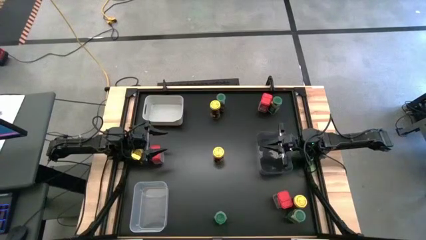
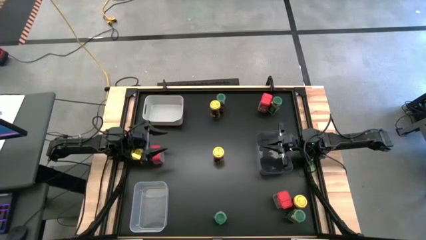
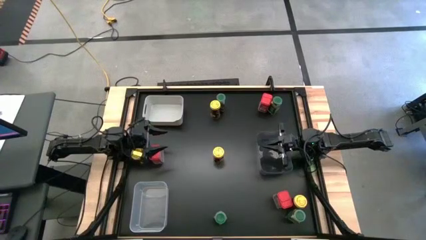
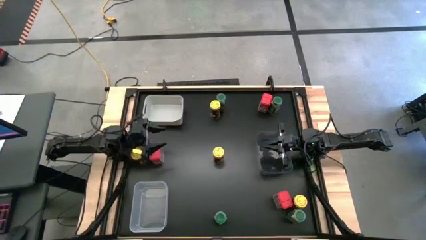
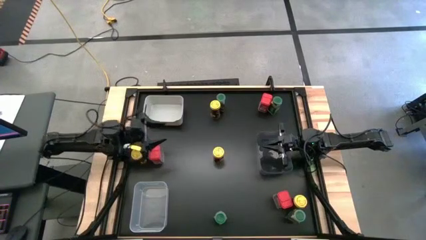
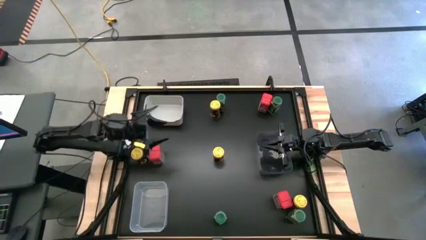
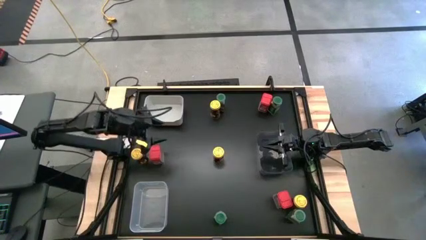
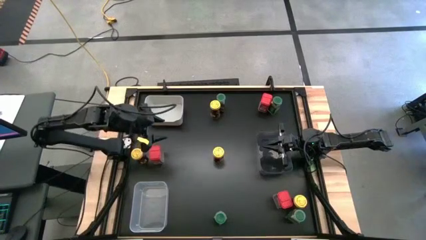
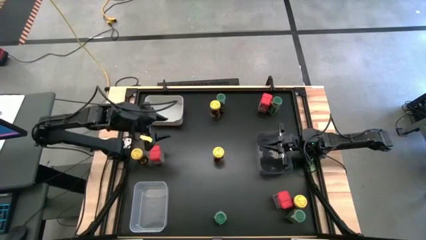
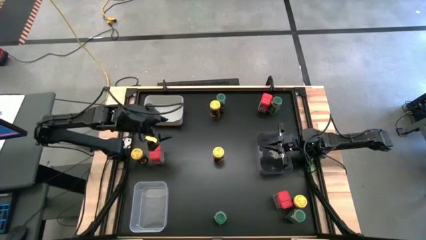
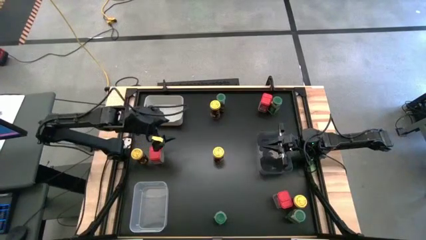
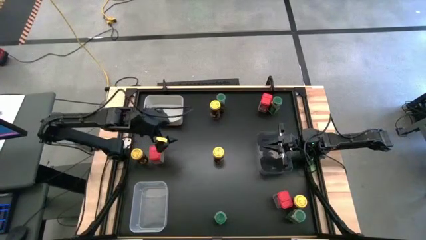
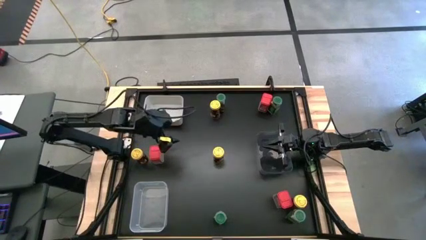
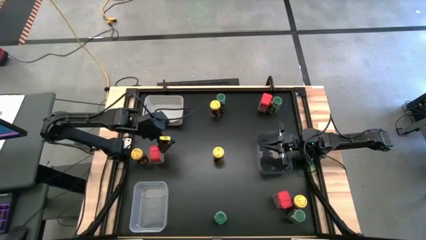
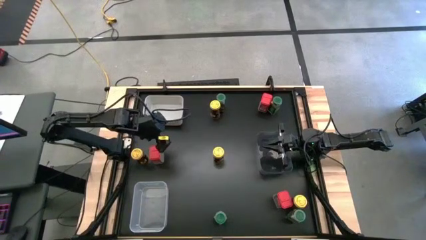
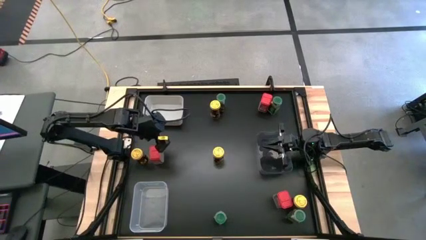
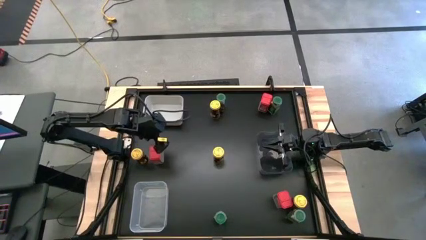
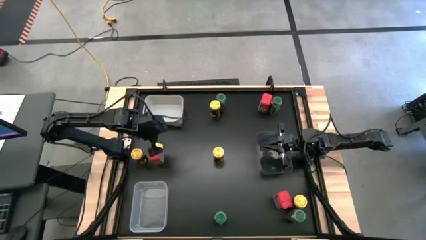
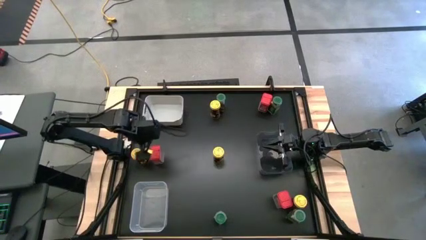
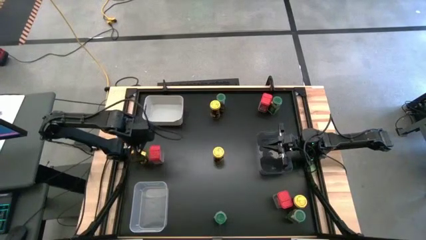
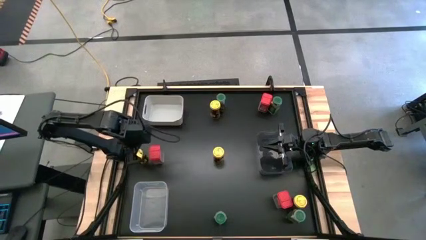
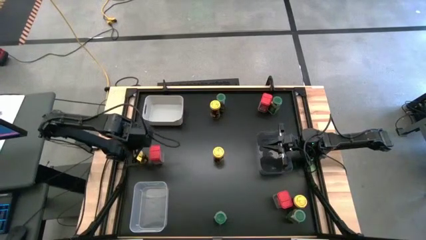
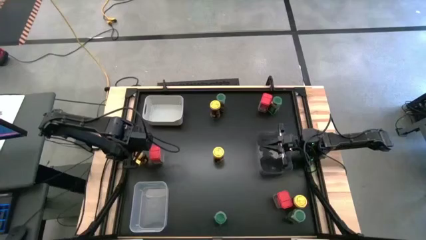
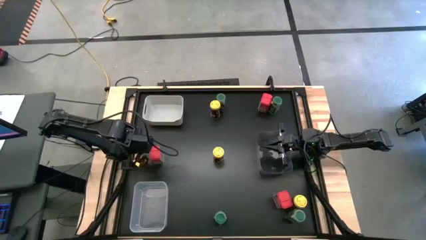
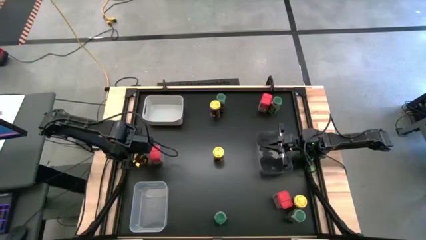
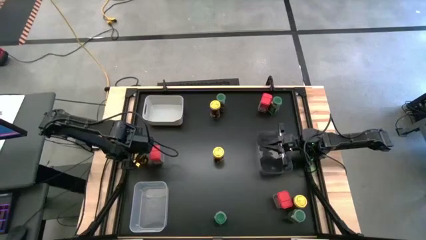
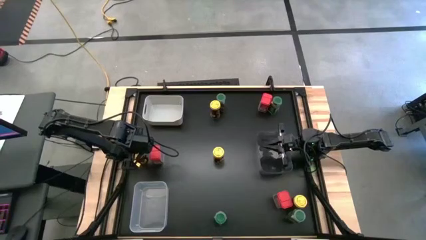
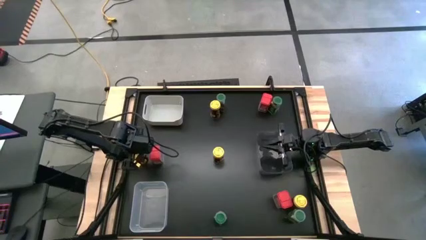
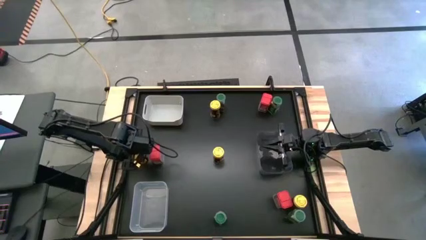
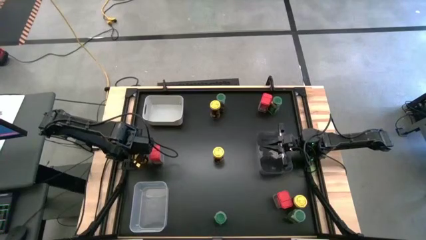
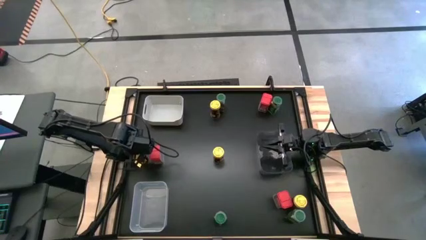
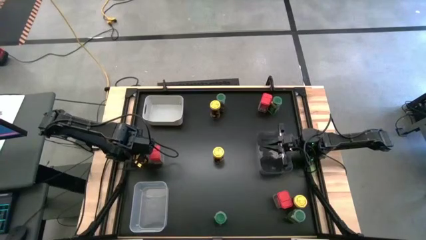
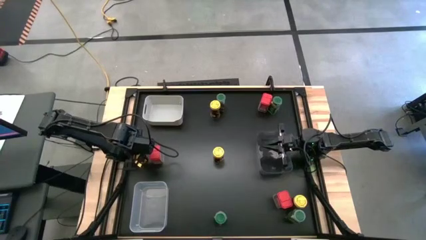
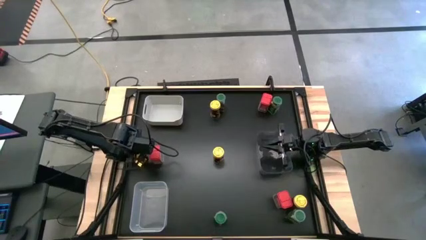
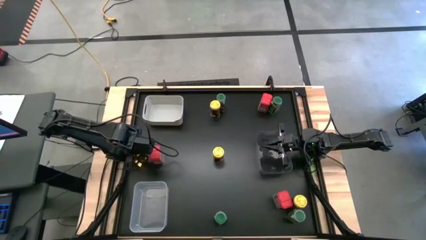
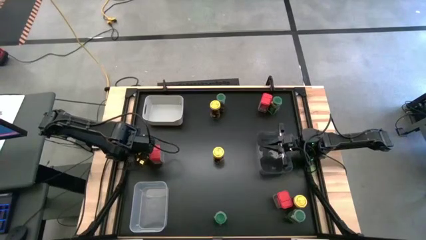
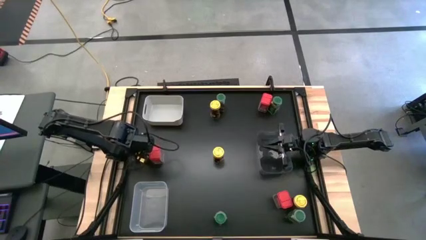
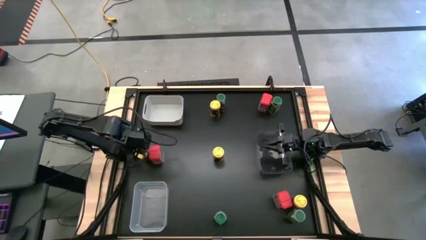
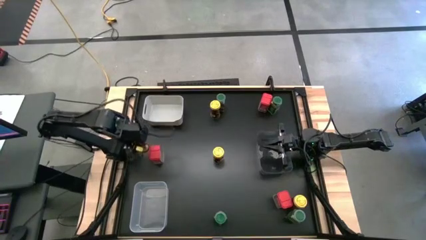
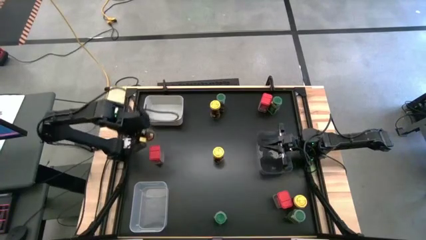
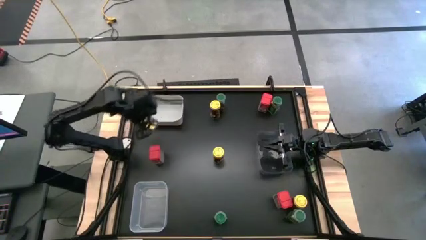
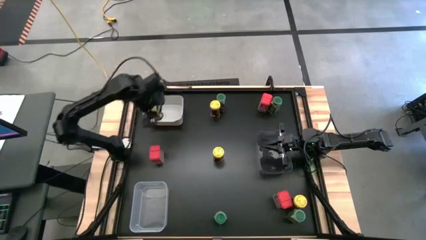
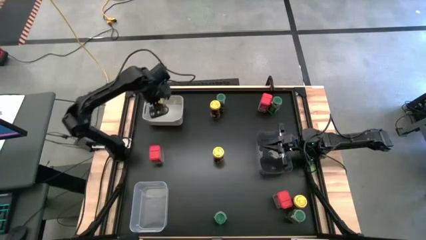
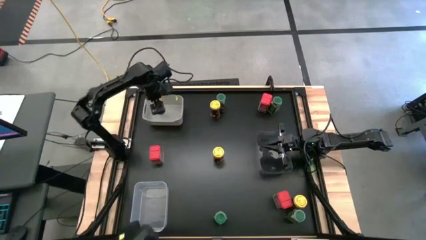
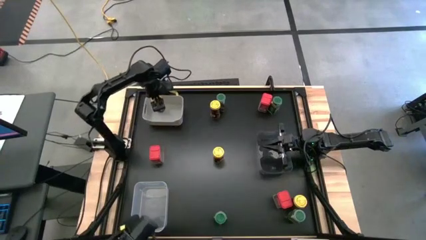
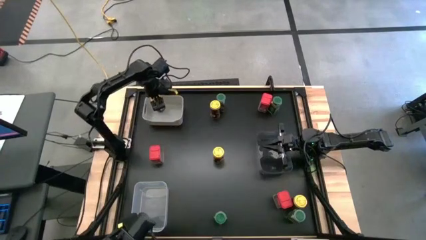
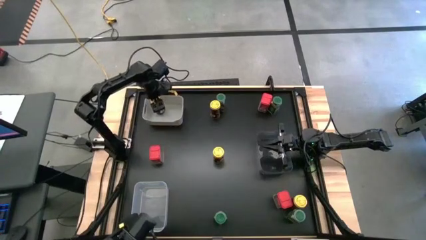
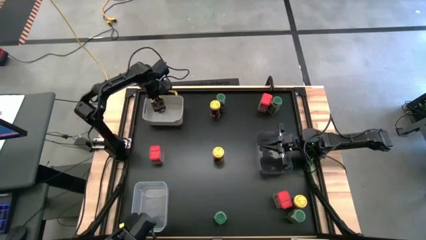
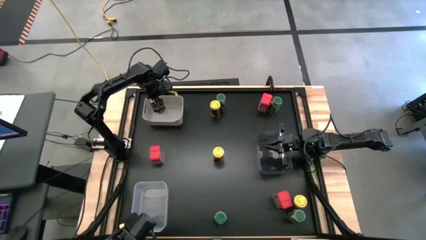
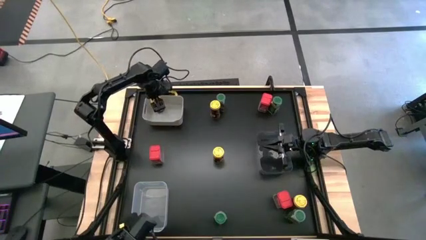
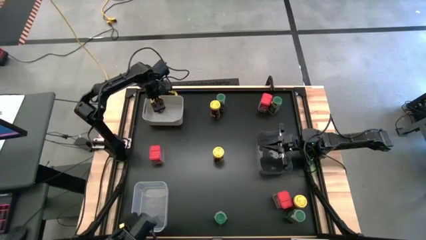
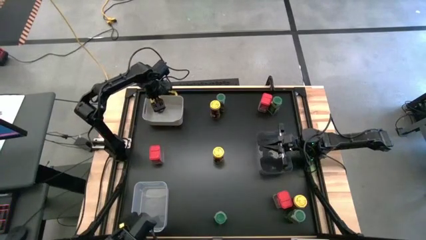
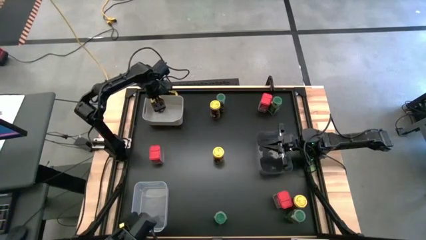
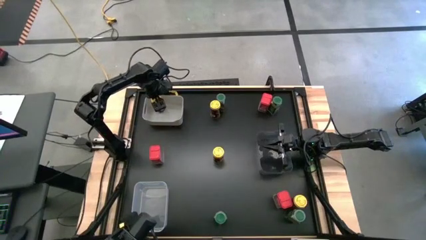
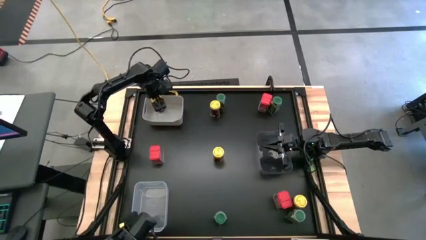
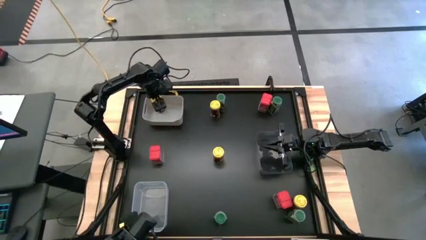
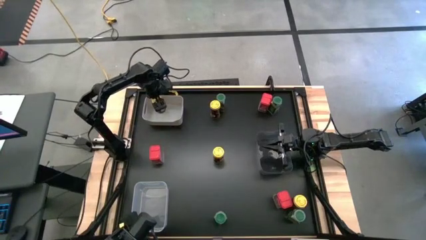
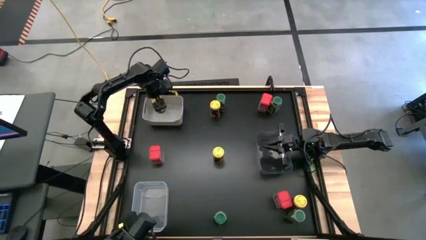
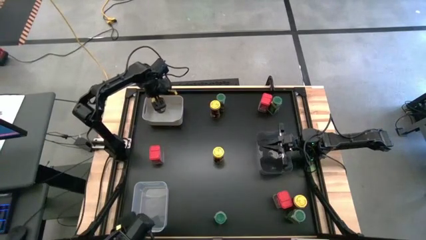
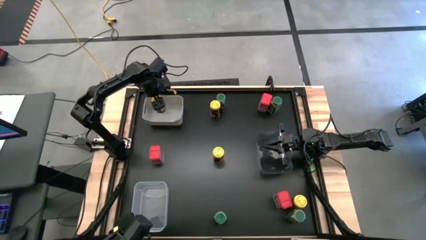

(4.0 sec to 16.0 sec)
Task: Sort spices by type
Put the middle left yellow seasoning bottle into the gray bin
